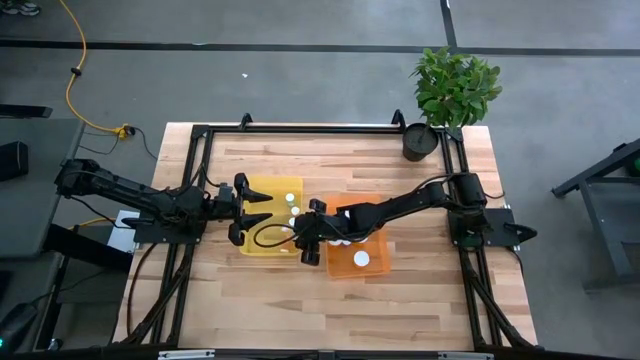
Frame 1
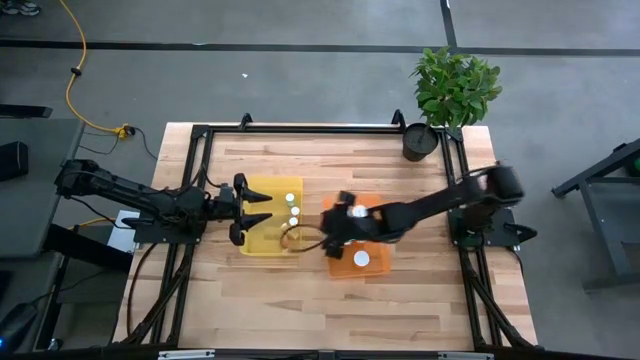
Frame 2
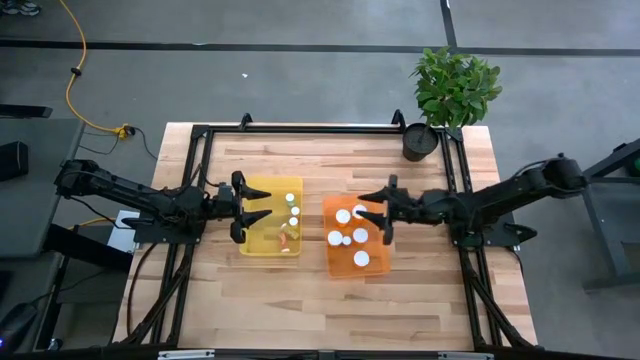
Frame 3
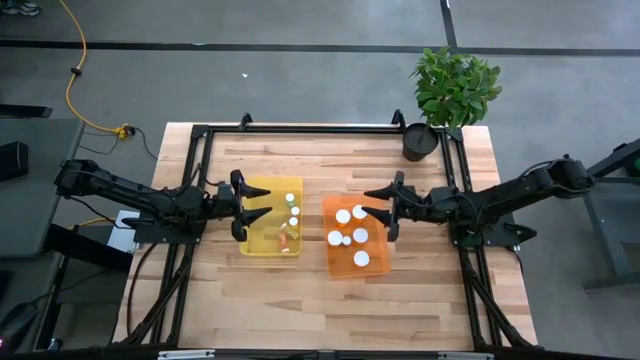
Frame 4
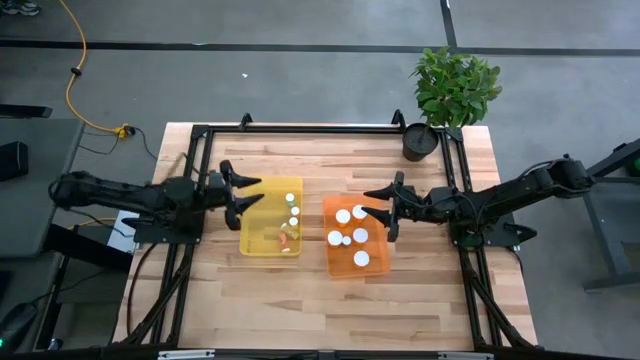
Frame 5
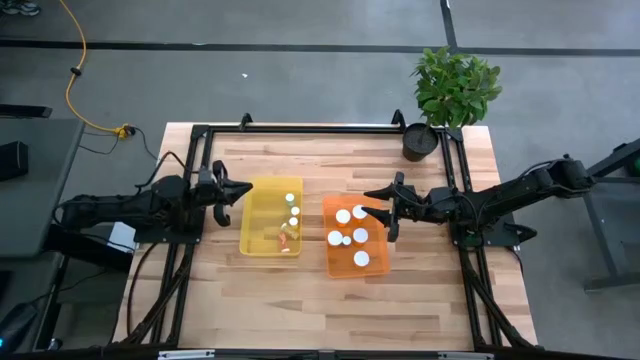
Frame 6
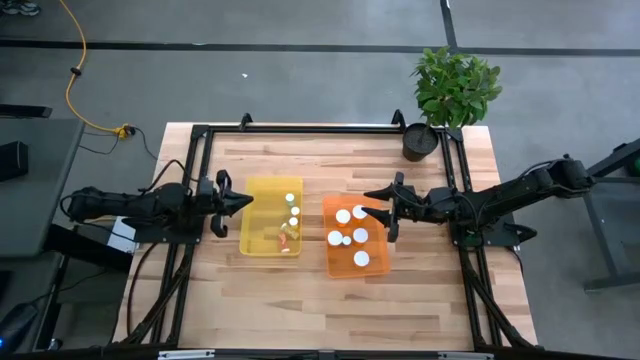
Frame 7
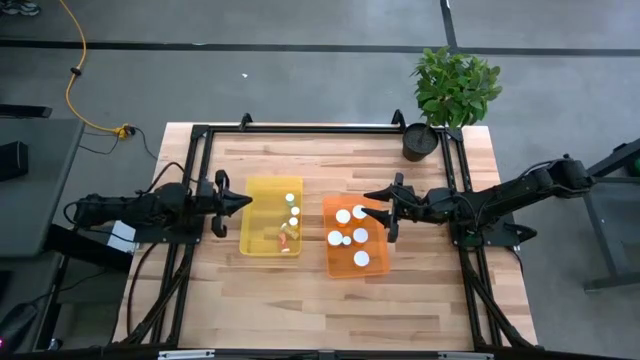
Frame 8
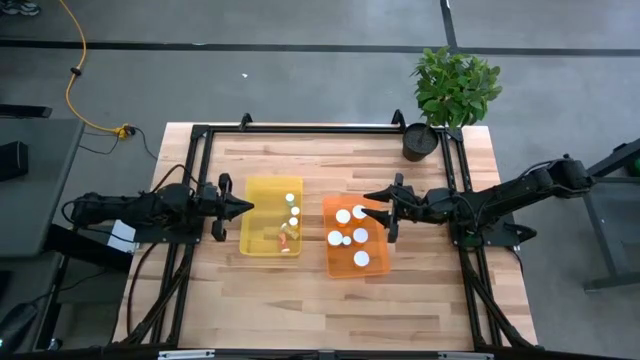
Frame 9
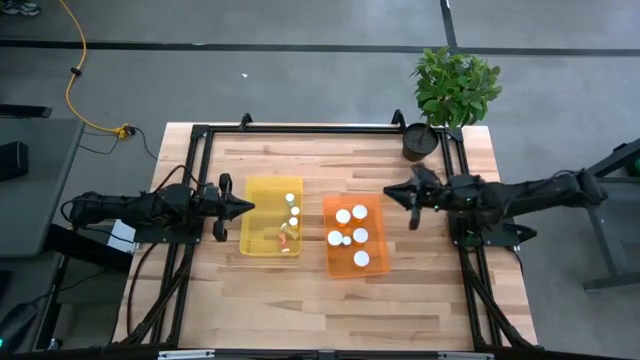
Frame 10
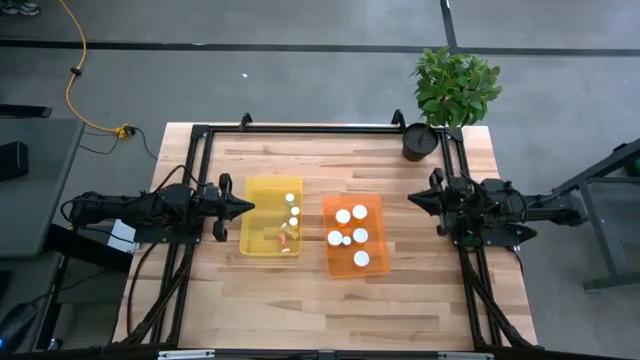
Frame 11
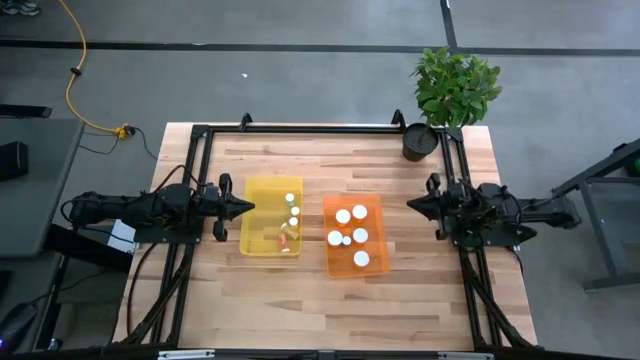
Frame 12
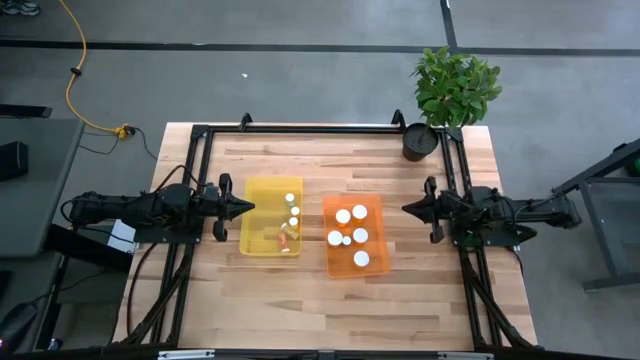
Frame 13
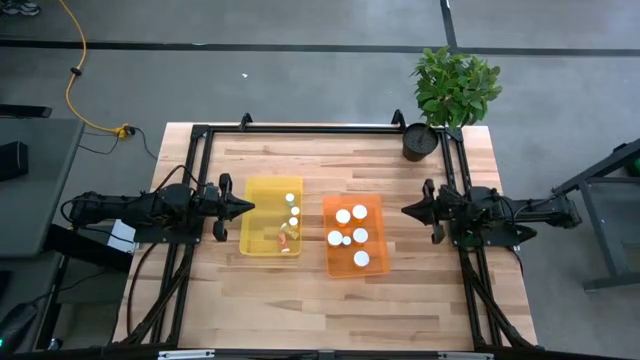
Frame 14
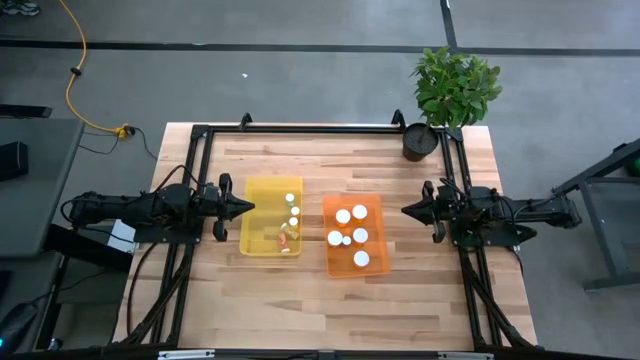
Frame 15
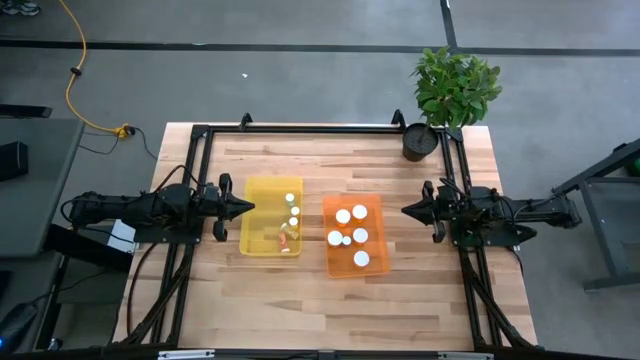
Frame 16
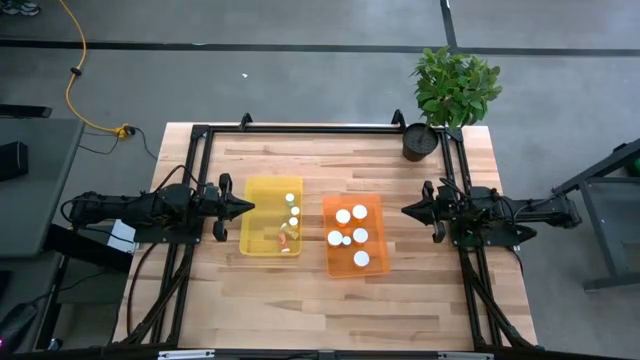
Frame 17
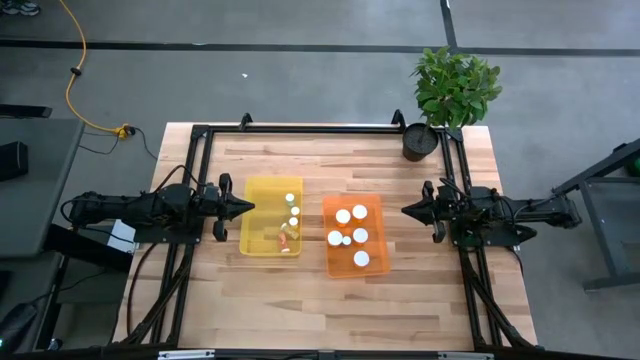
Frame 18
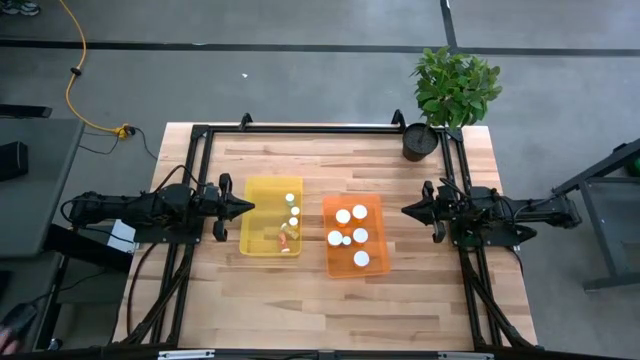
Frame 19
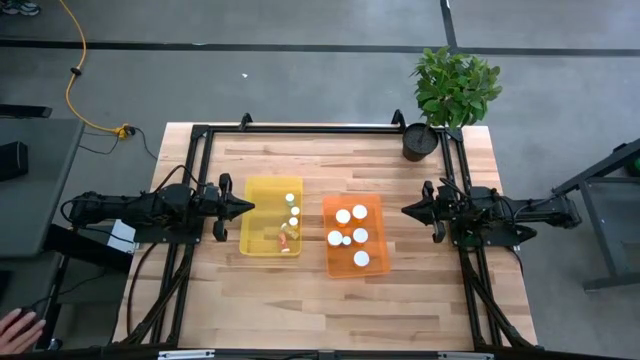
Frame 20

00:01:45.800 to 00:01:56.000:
Task: Pick and place medicine bottles into bin by pill shape (circle, oval)
Return to Home Position

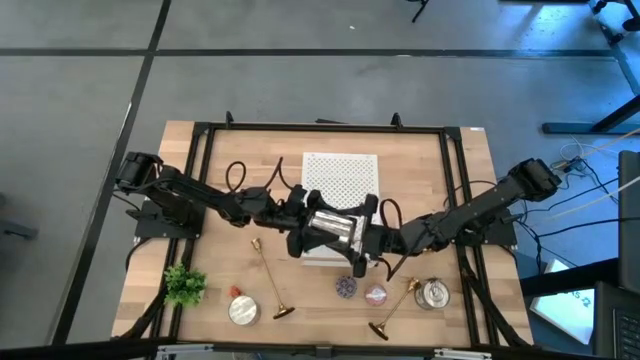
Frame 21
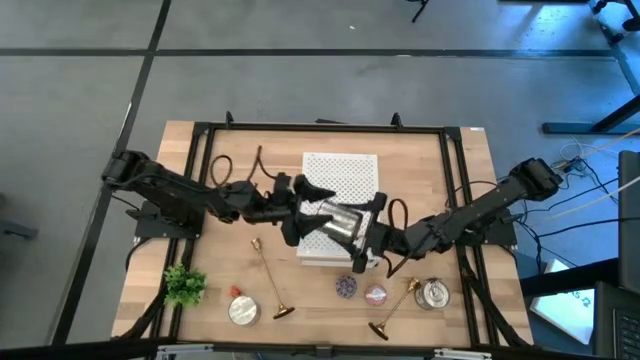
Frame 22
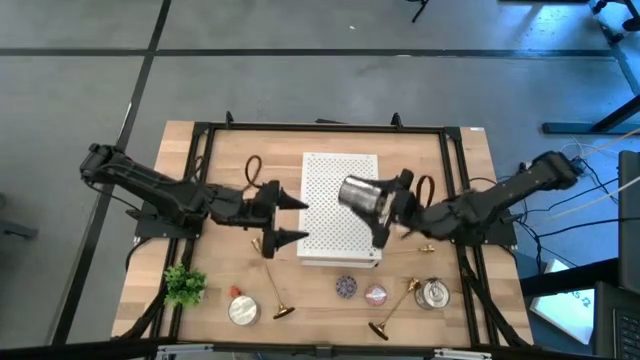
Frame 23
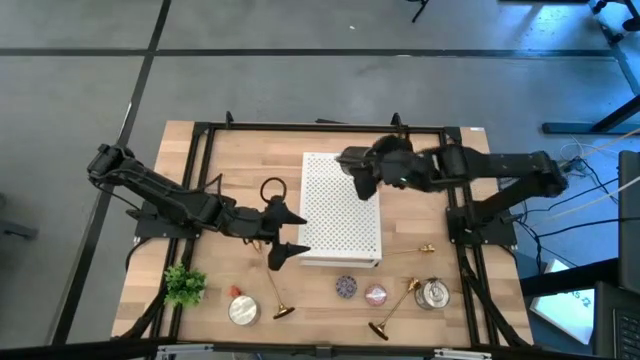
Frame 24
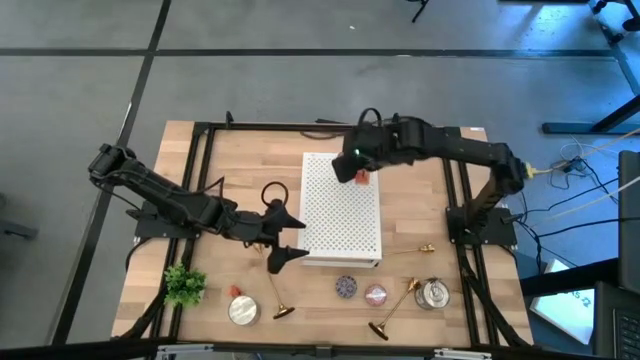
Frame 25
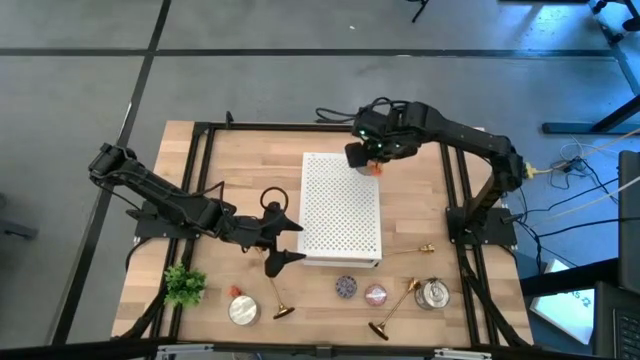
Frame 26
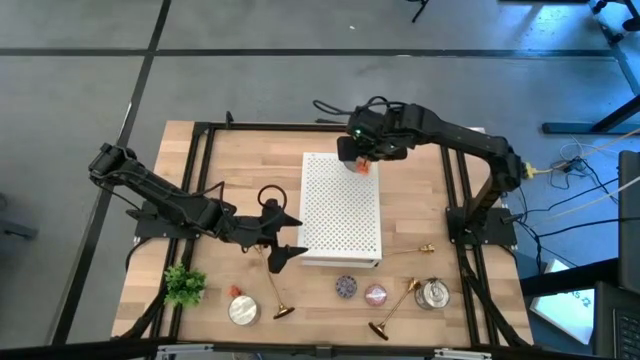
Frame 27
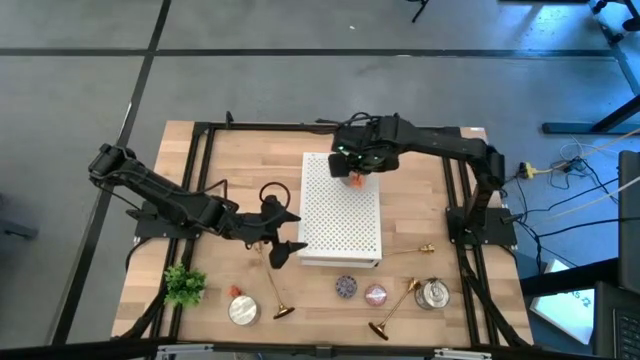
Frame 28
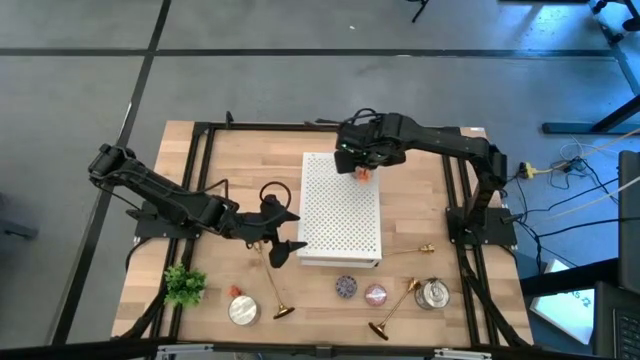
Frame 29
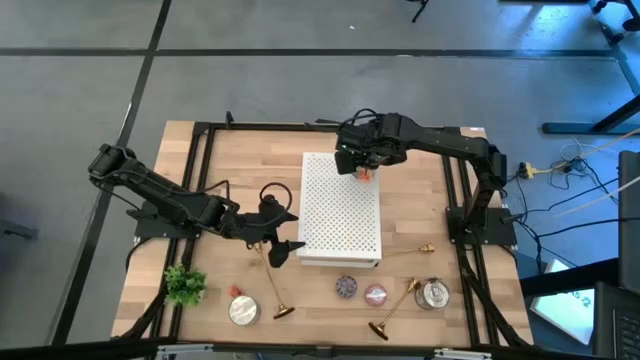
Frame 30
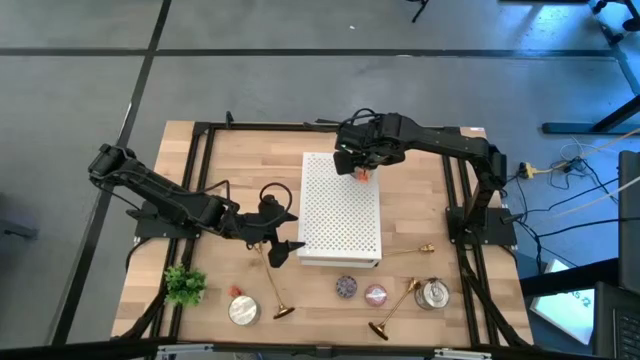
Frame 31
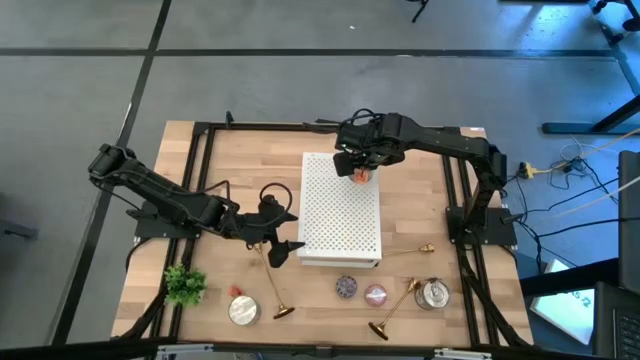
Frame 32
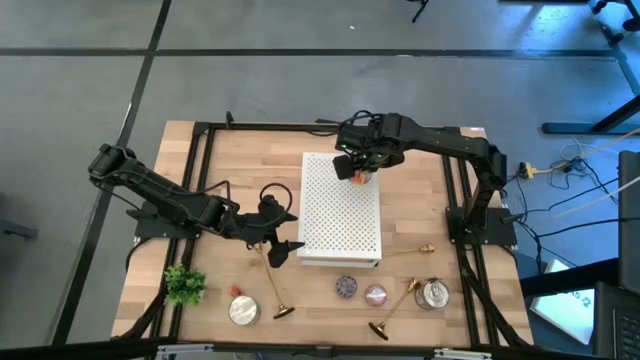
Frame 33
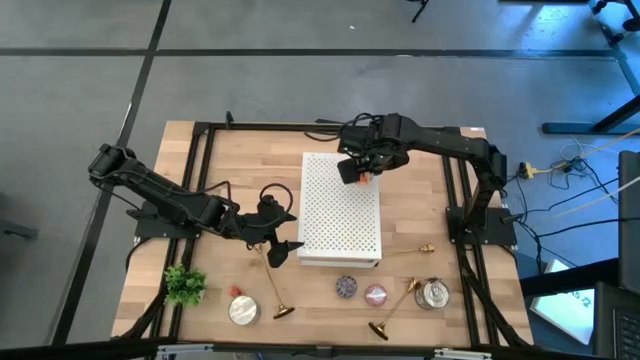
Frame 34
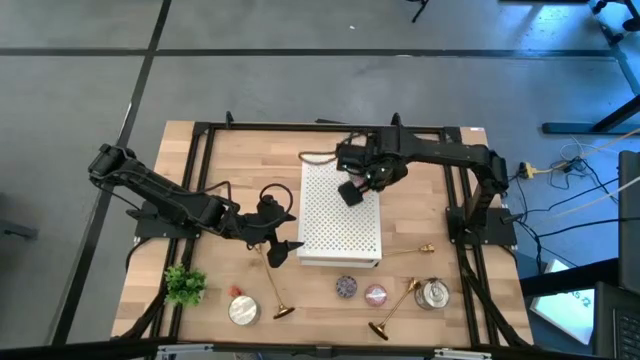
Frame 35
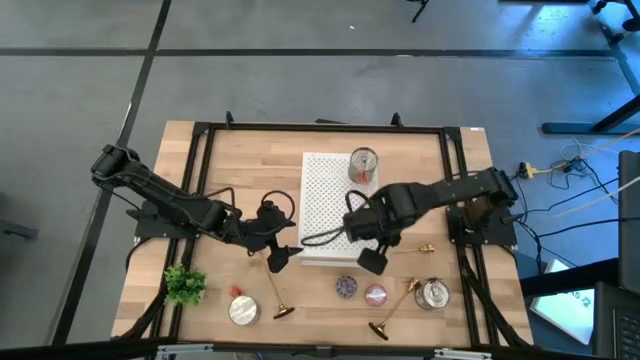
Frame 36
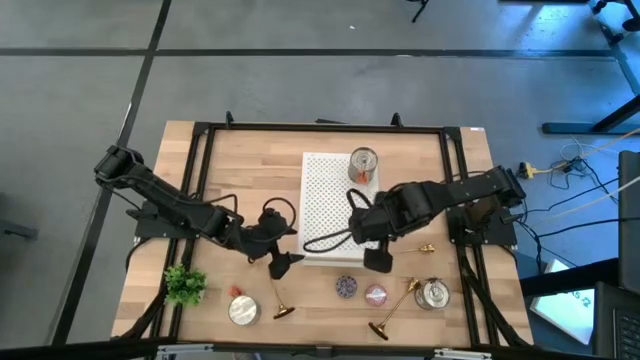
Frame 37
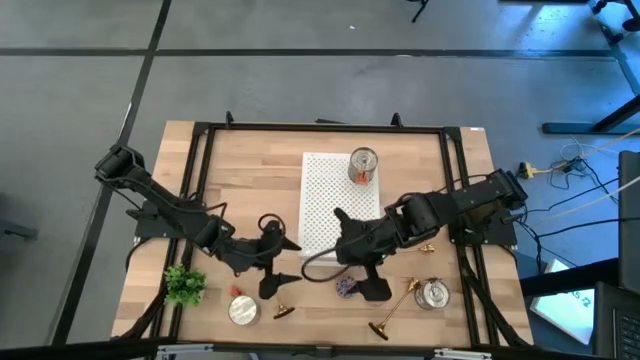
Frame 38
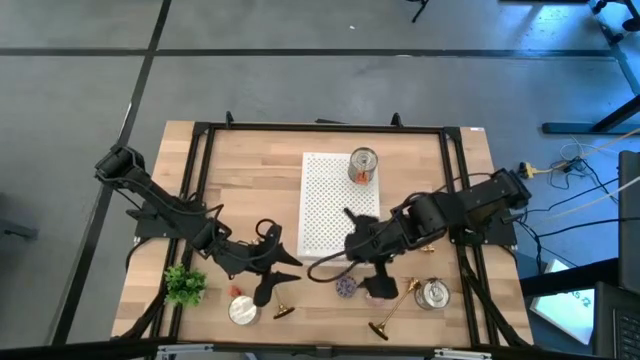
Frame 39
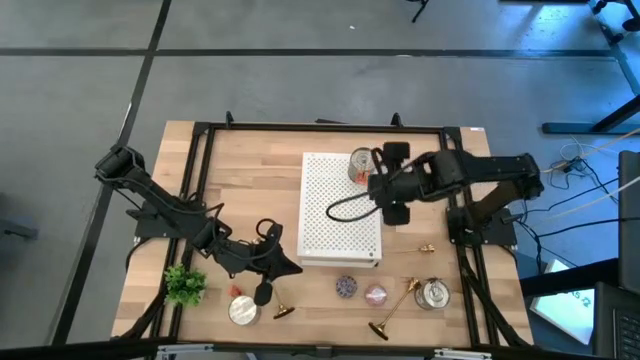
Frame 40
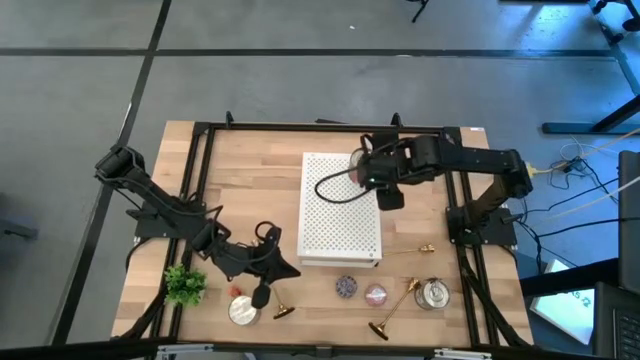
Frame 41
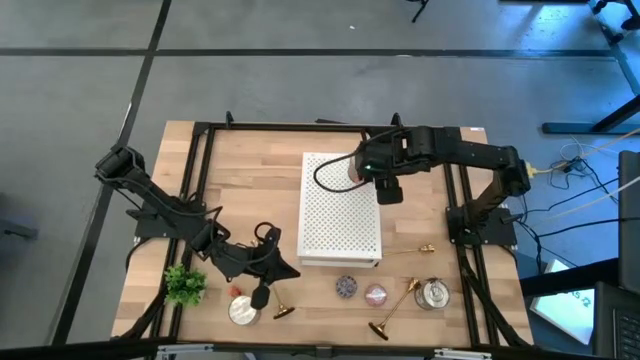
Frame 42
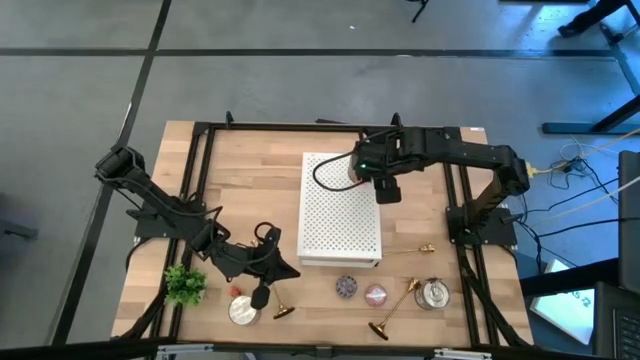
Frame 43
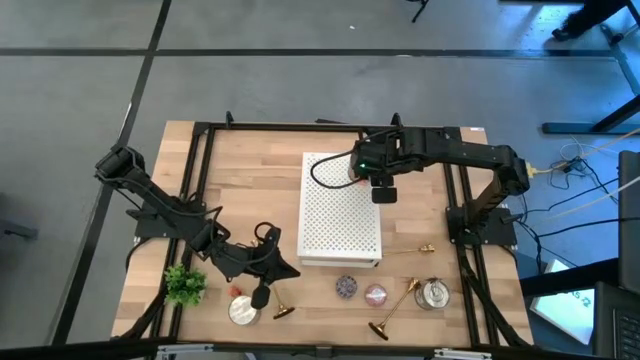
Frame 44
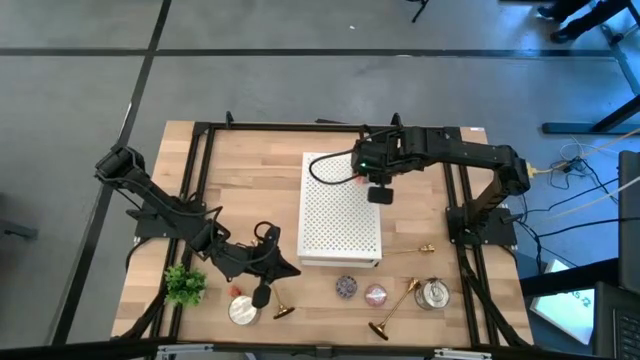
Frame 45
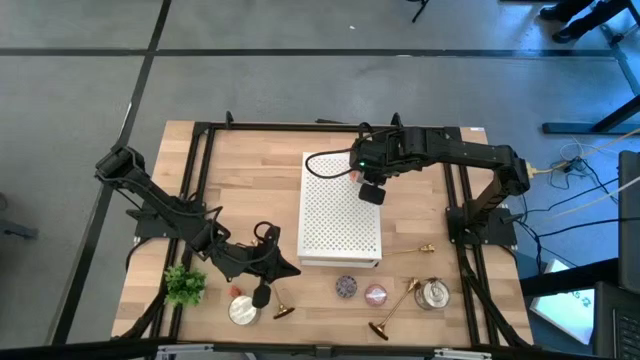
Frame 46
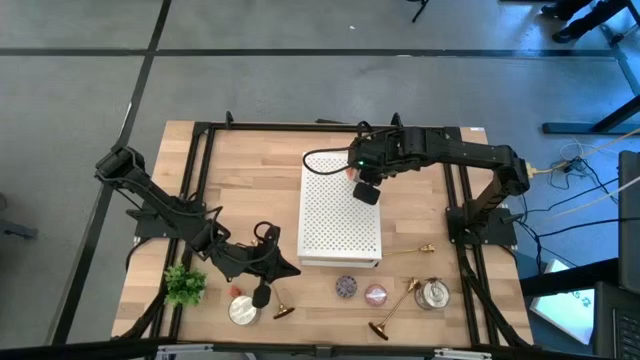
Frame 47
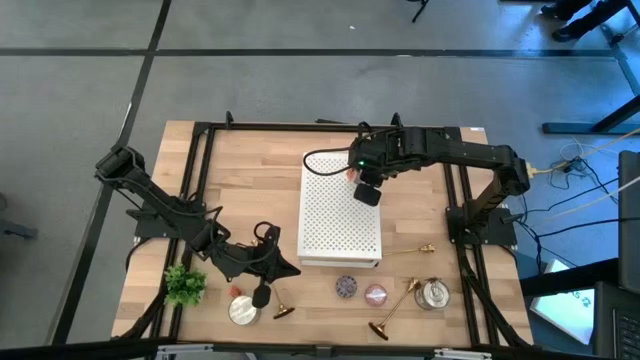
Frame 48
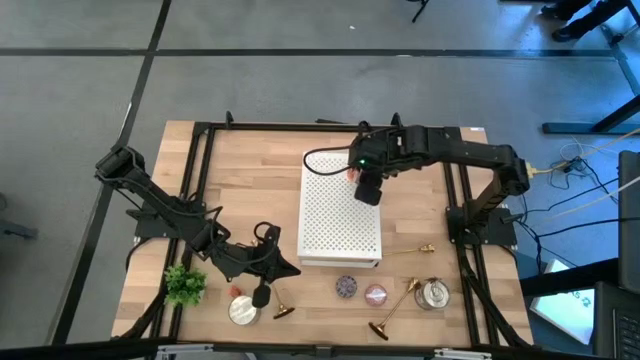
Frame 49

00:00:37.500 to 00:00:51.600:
Task: Pick & Place candle stick holders
Put the top silver scented candle on the shelf
